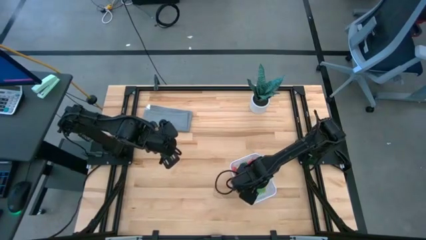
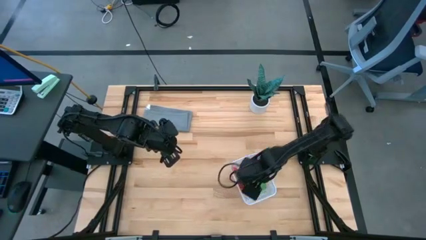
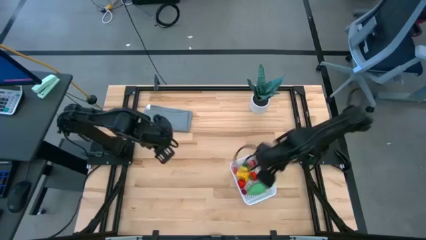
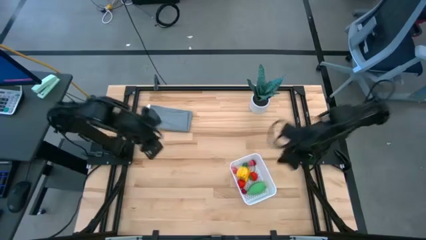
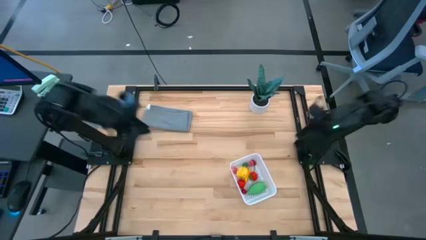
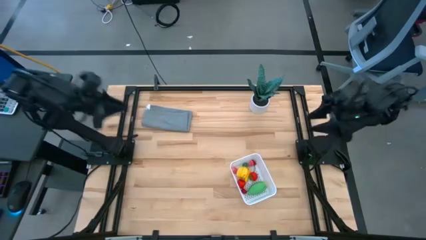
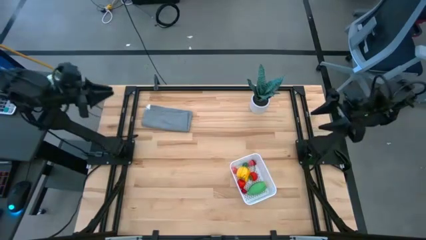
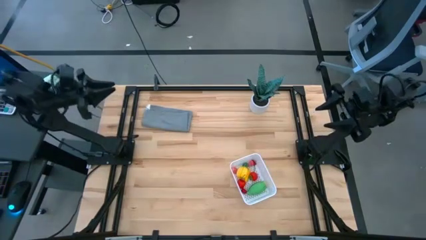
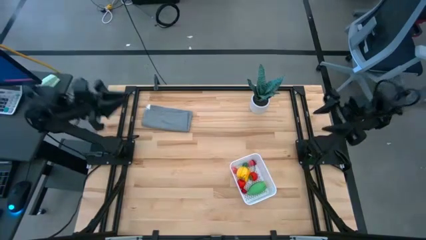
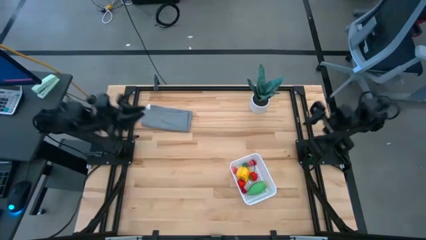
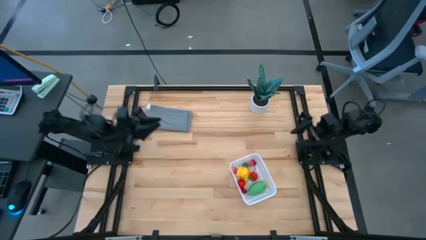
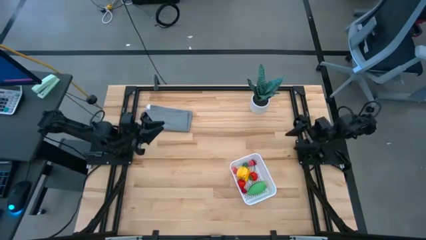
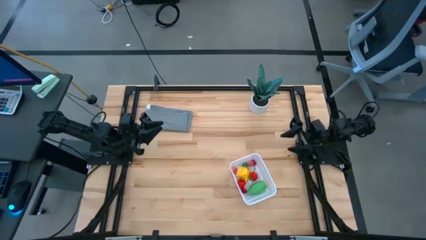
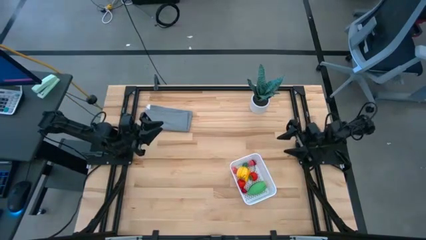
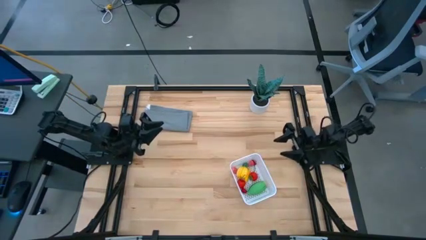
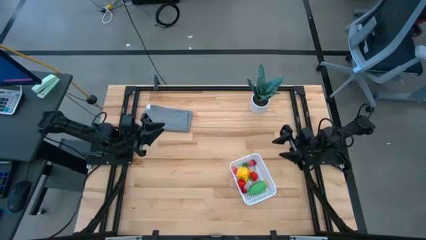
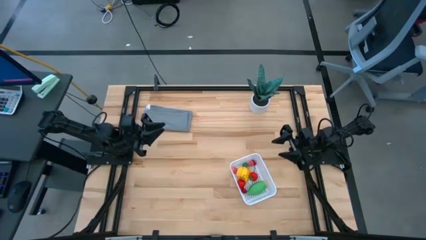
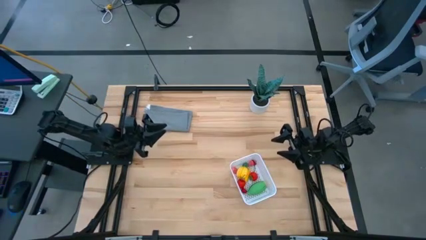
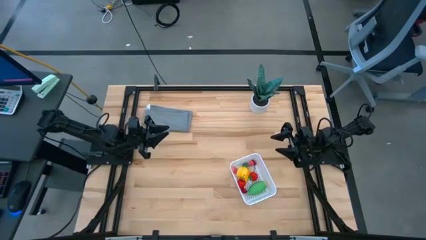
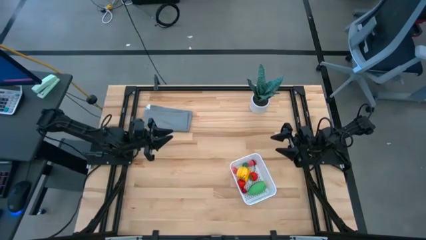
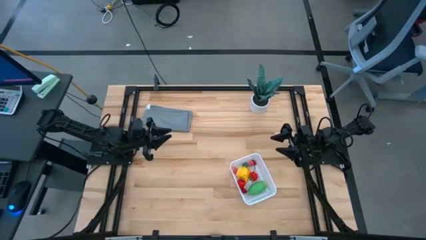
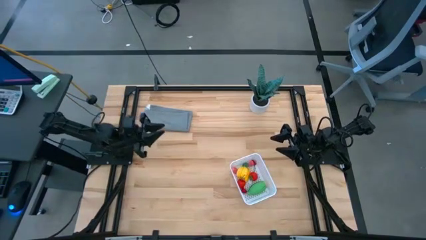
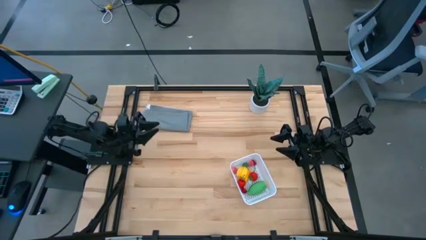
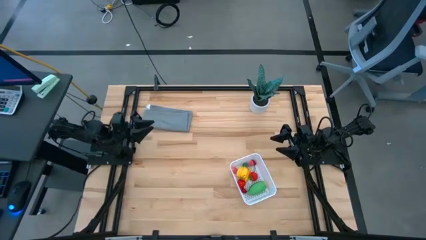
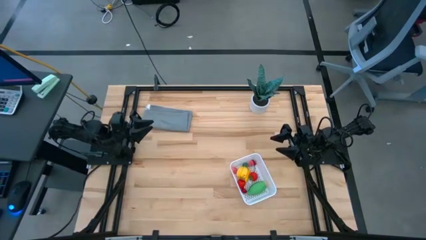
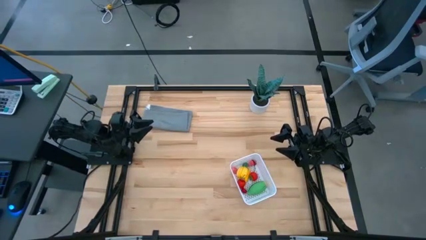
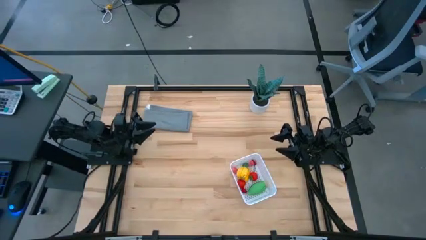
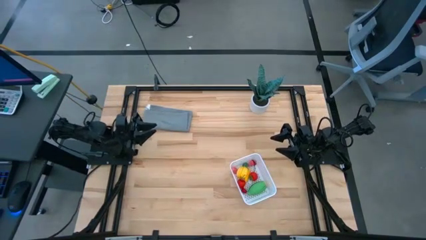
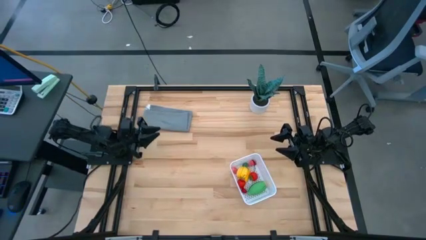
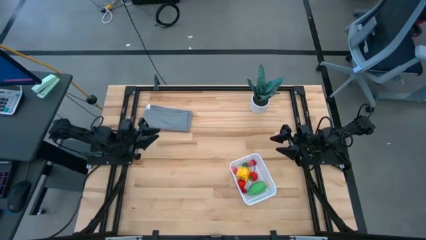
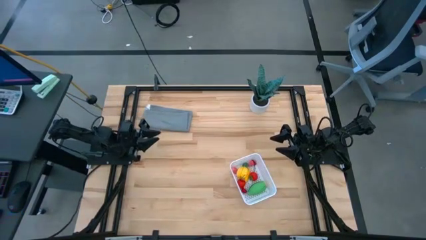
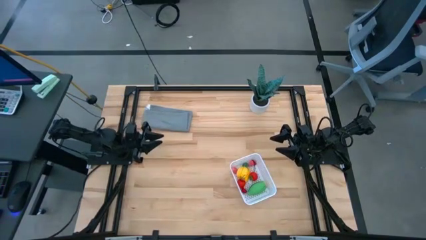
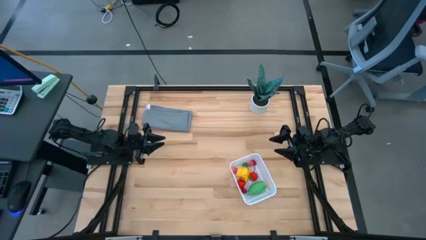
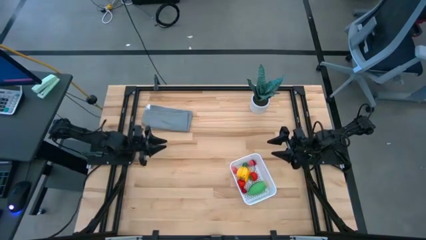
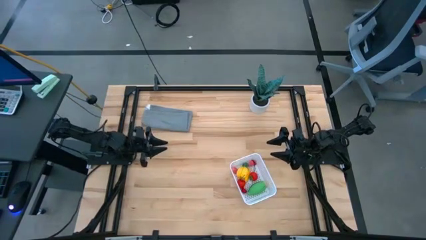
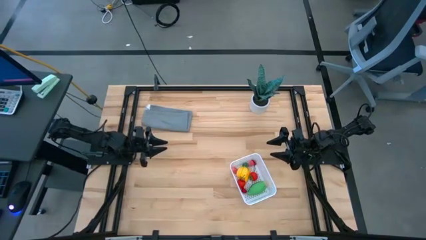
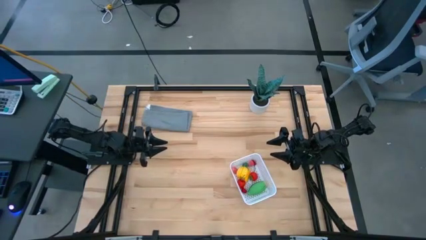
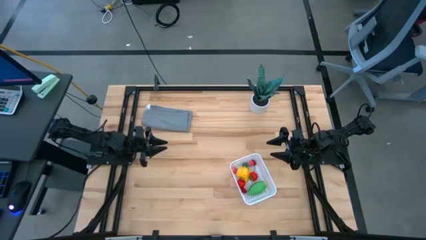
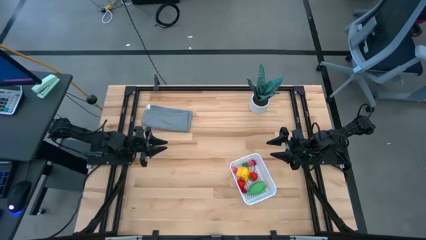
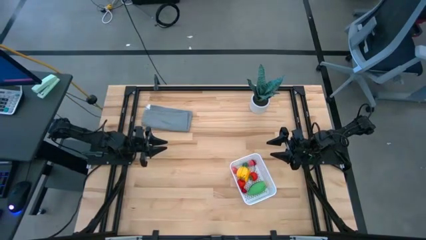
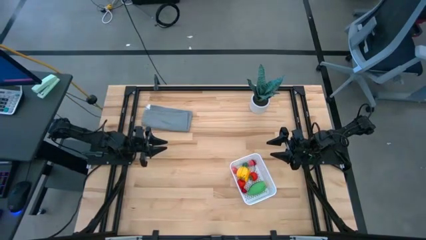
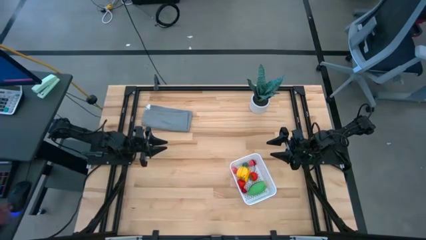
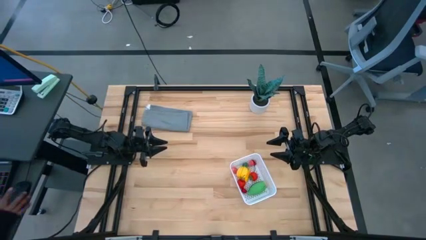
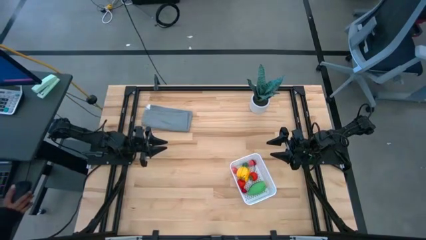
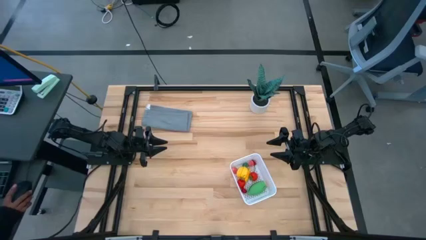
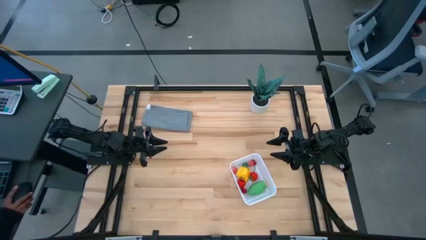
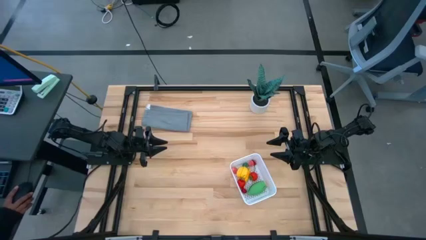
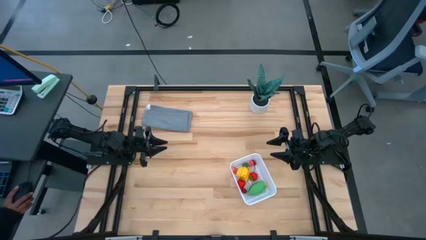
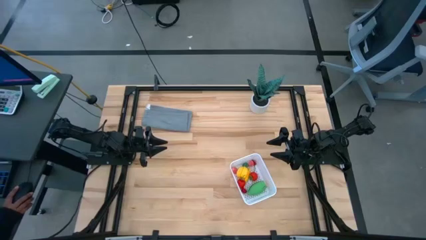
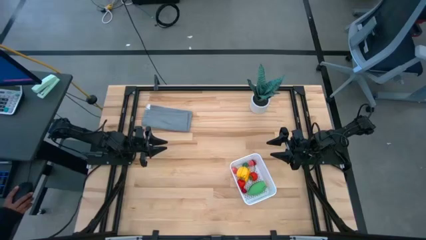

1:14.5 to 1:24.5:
Task: Pick and placing Produce into tupperware
Return to Home Position

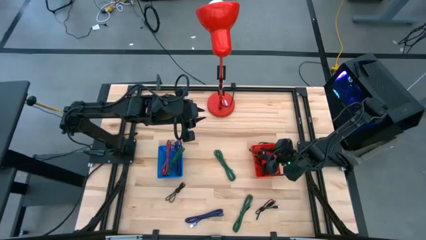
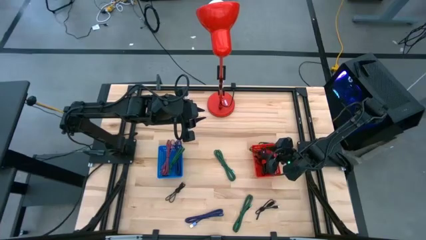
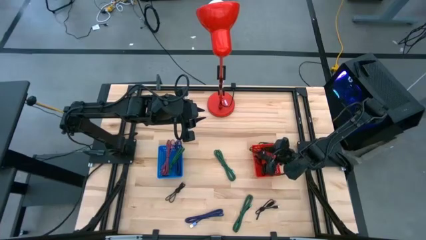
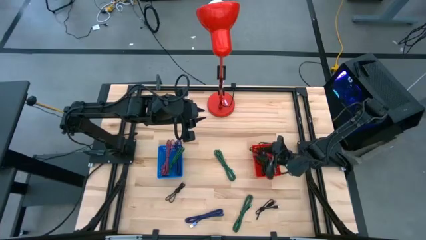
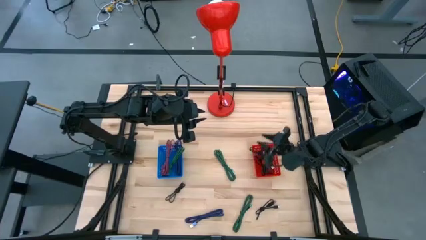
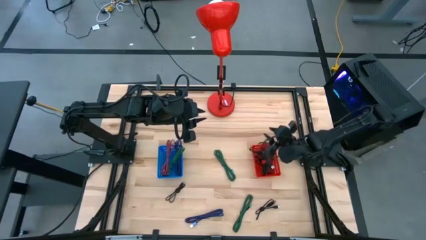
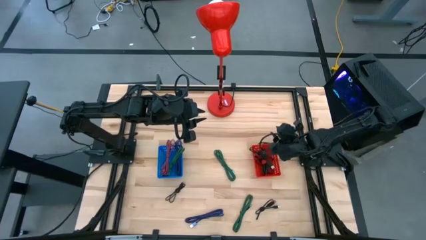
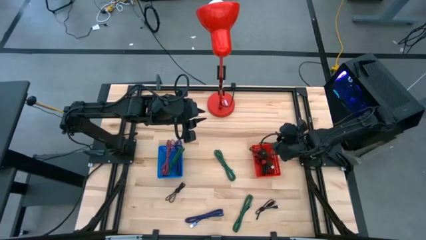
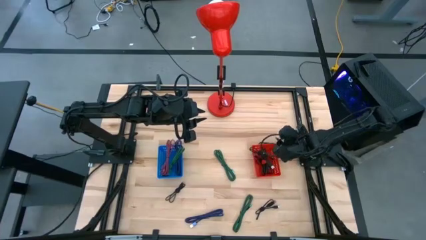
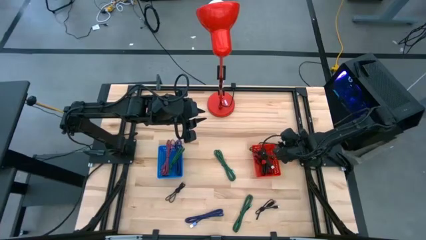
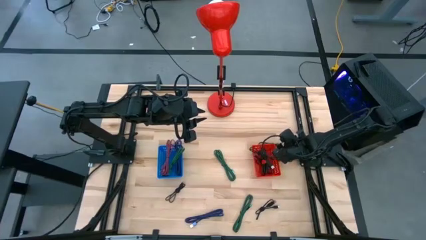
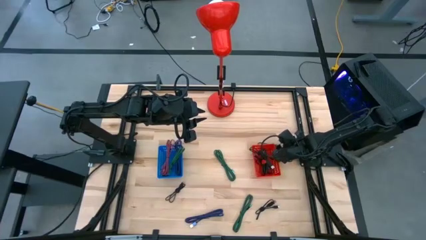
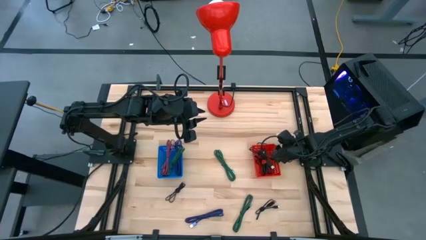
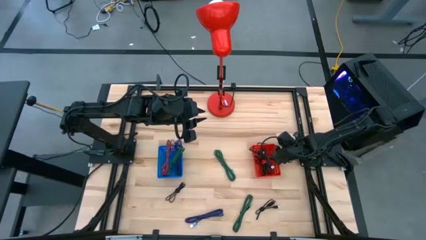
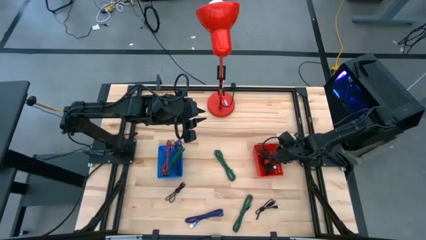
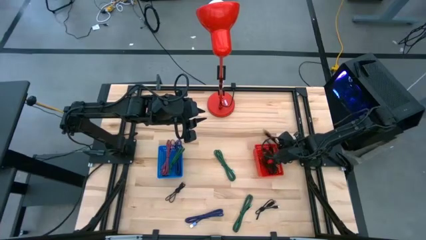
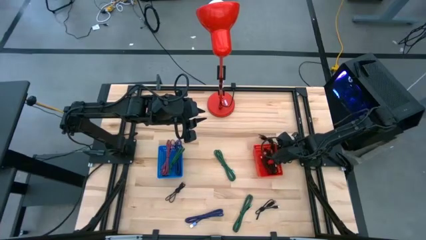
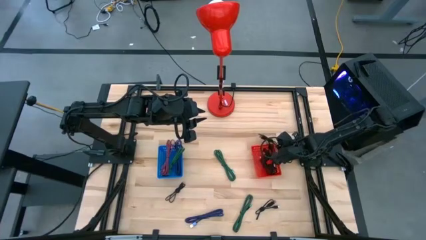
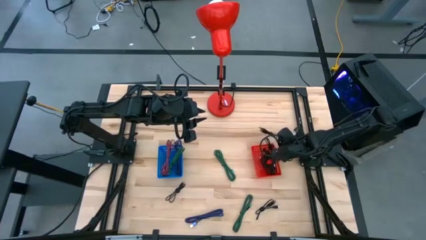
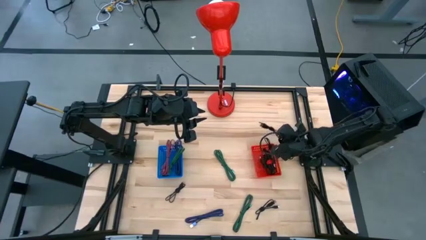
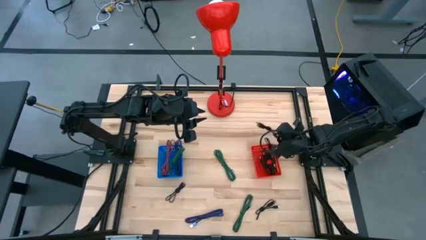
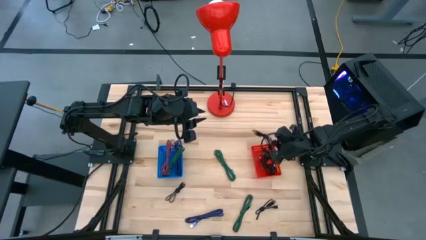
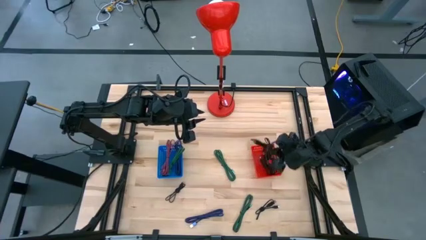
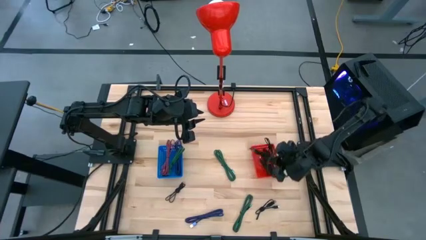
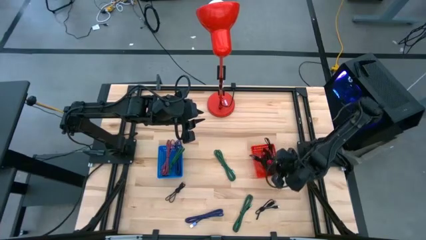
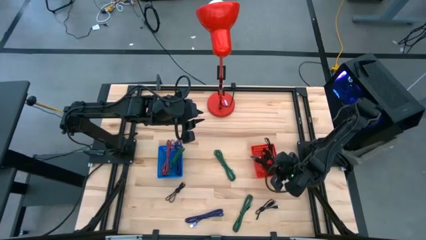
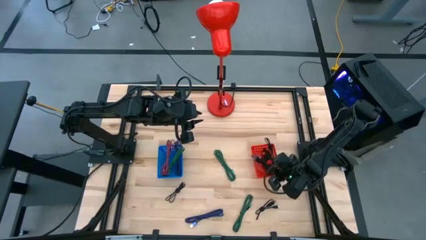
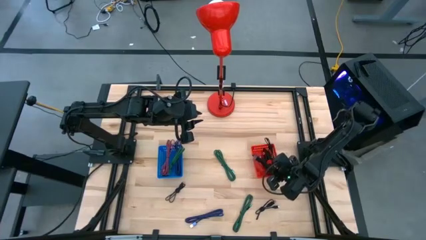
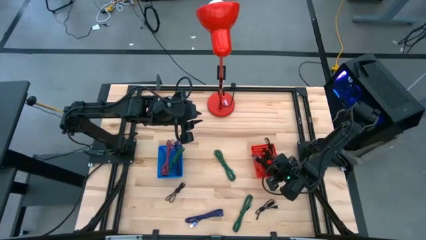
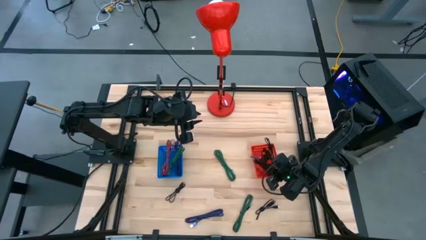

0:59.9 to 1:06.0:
Task: Pick & Place USB Port
Put the black charger cable into the red bin
